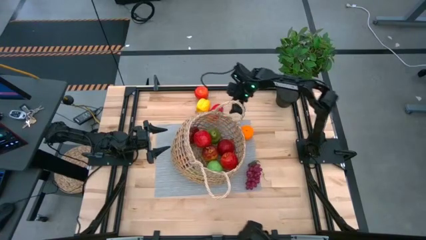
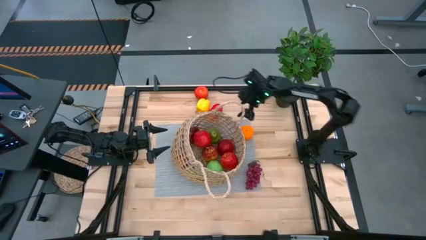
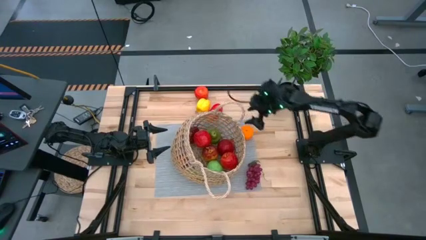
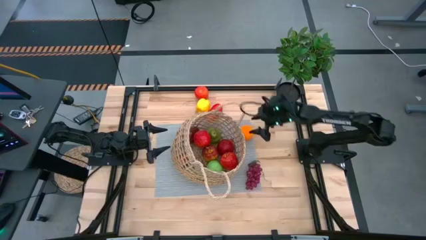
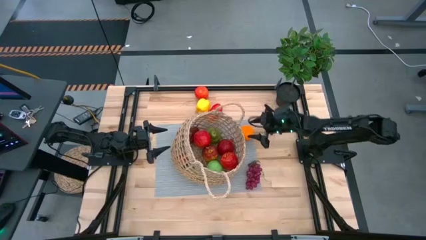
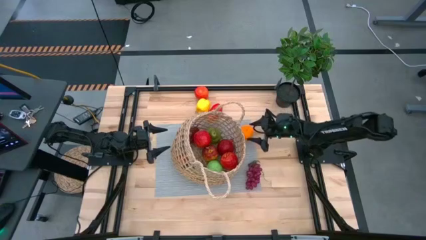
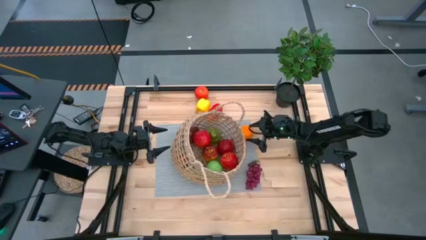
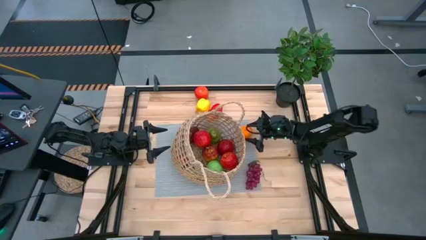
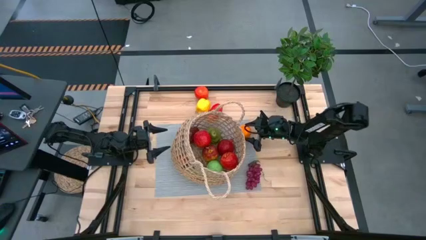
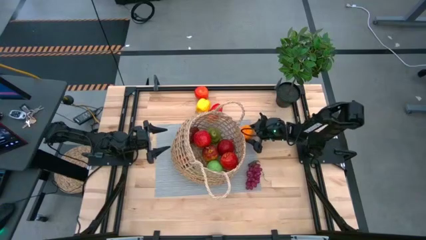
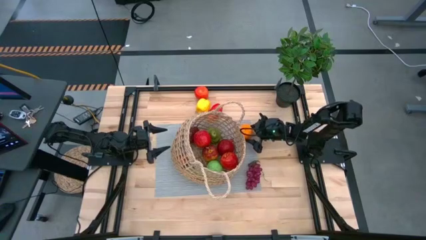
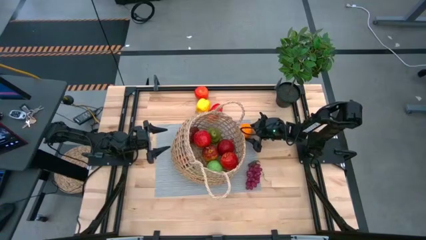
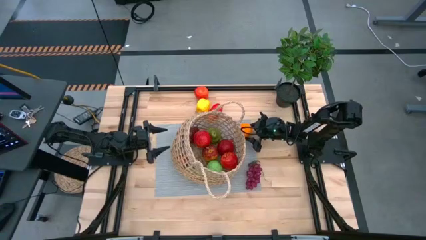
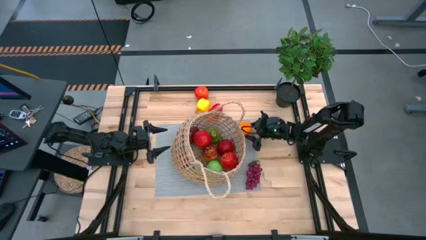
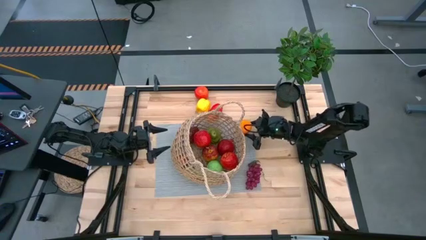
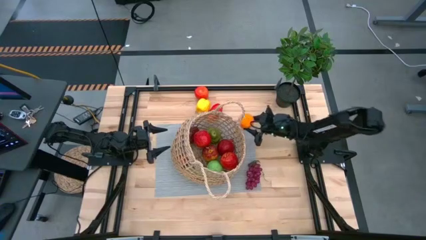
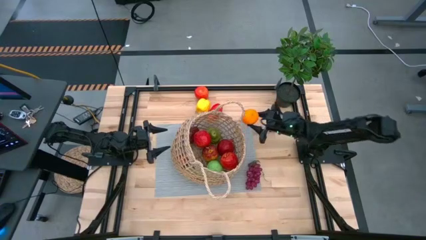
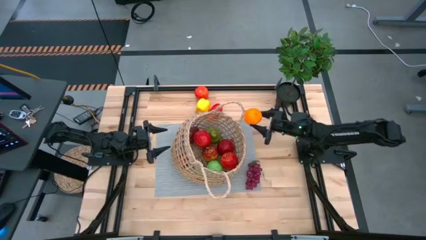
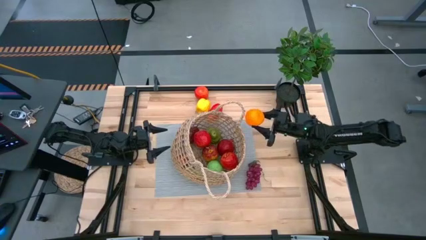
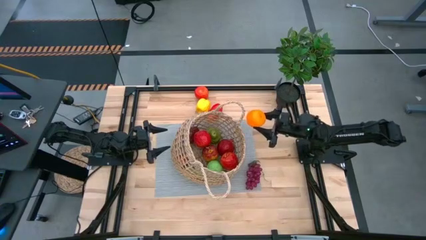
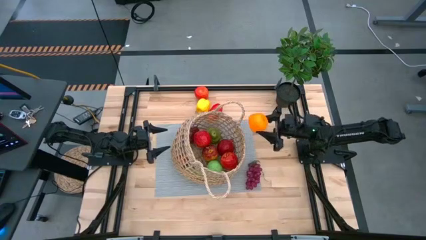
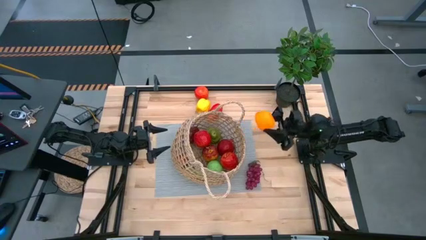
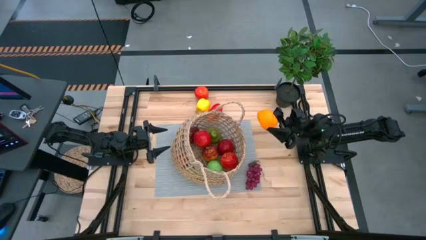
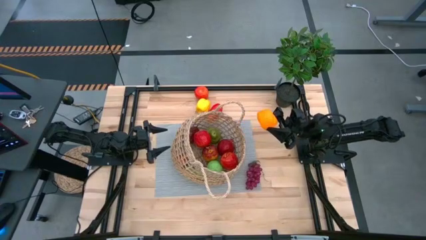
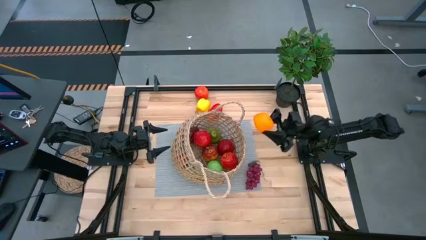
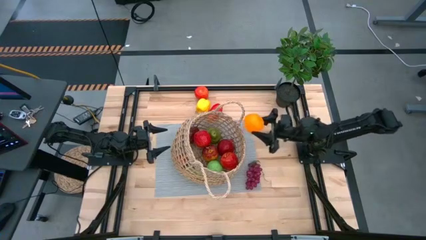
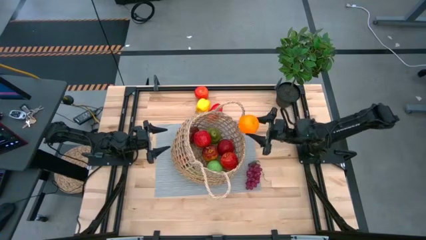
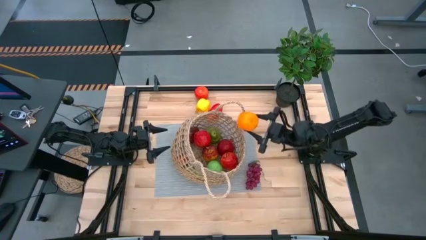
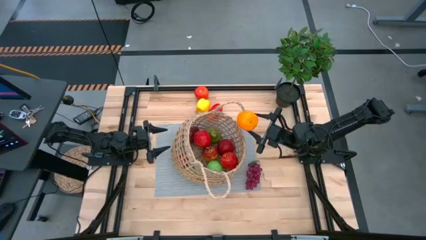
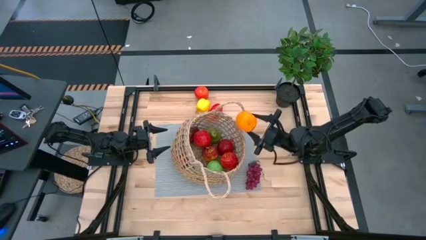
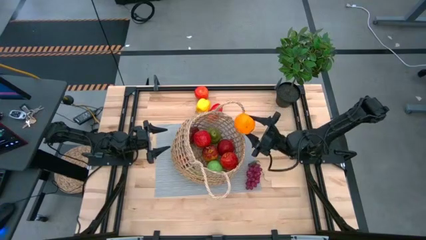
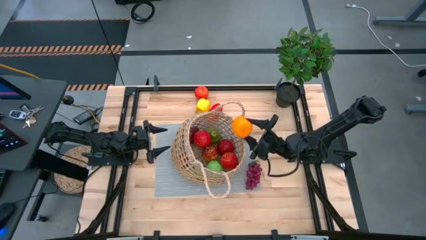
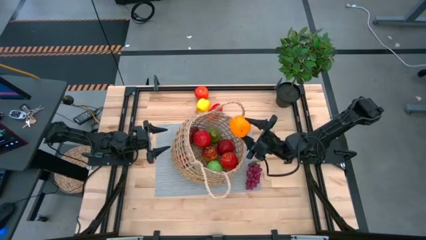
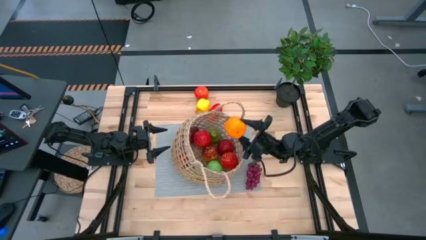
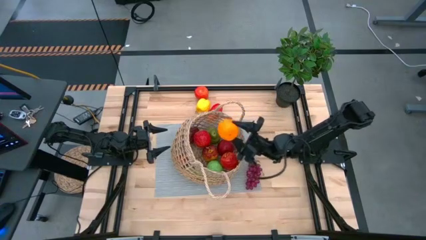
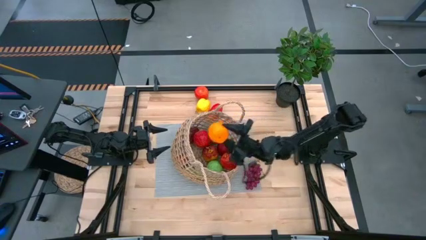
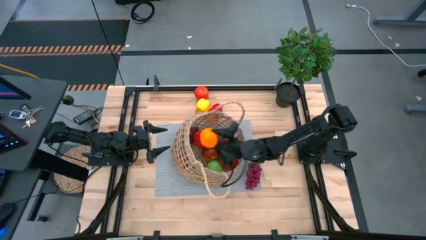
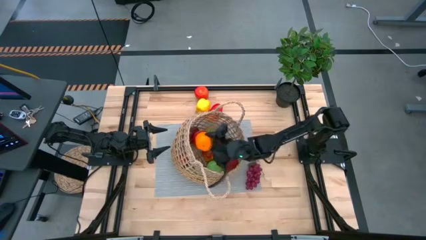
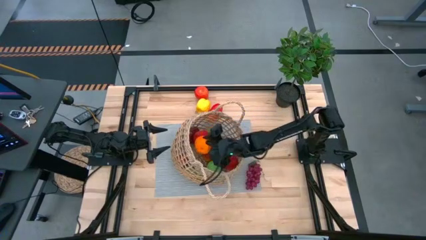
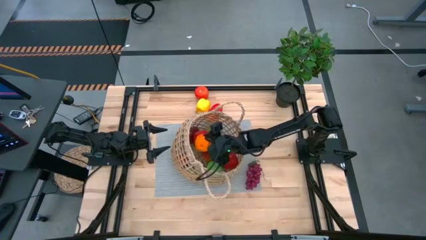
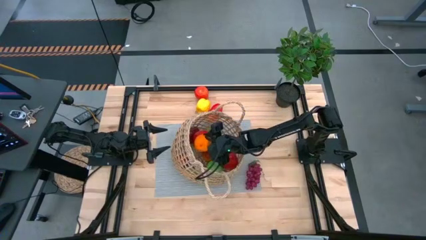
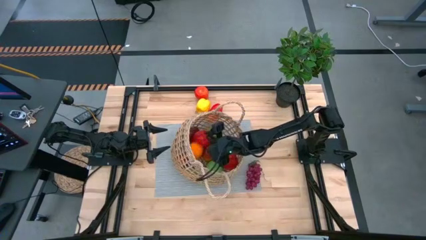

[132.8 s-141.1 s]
Task: Build produce basket
Put the orange into the mesh basket

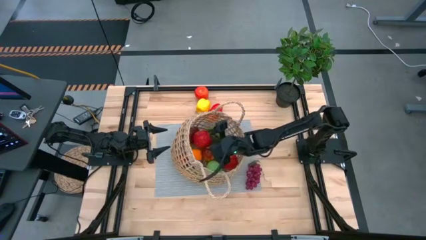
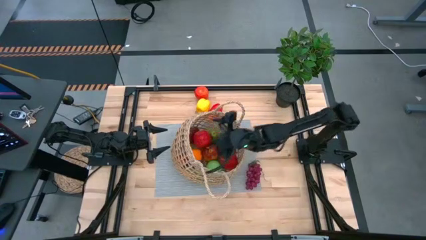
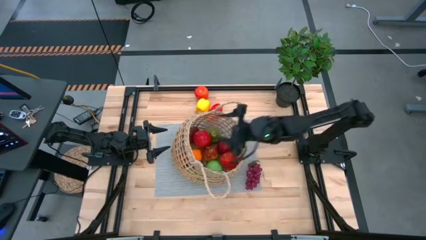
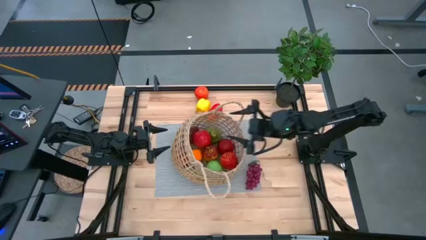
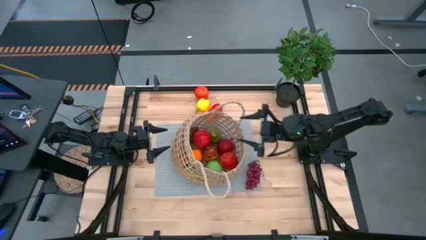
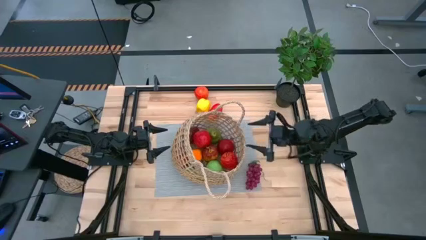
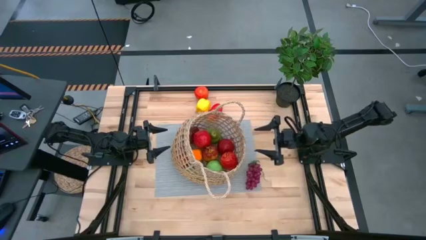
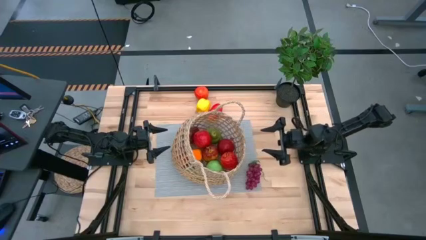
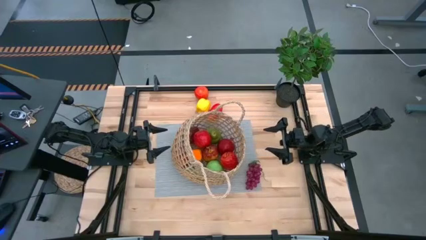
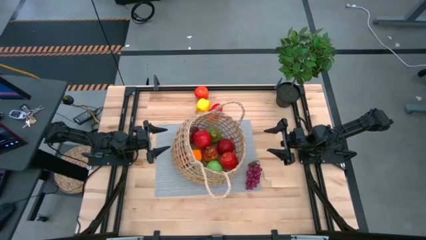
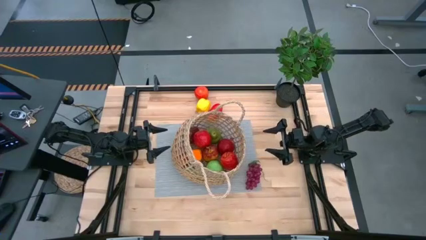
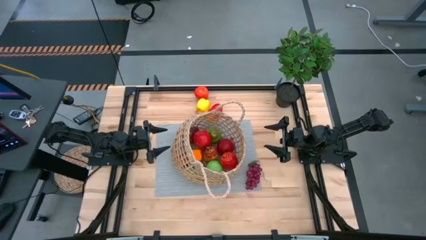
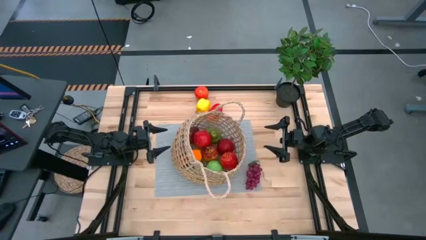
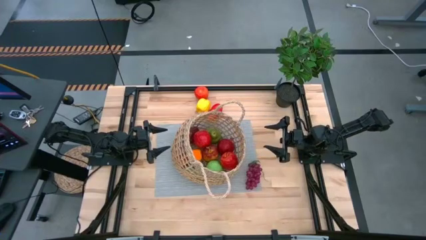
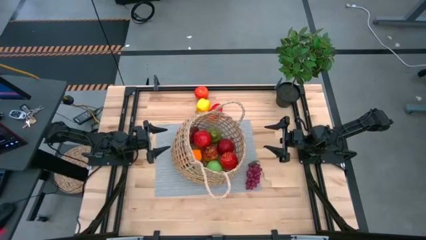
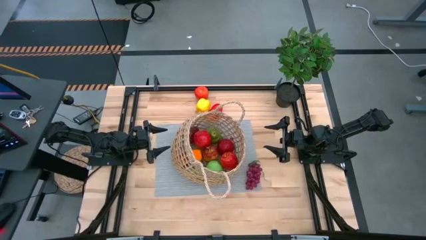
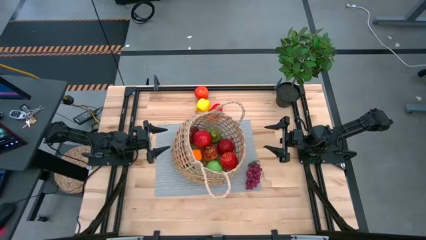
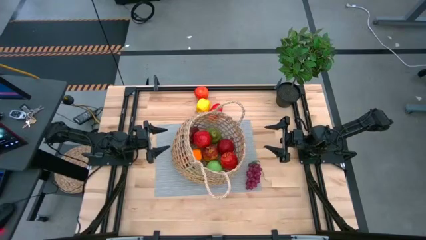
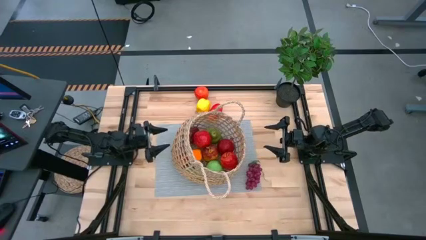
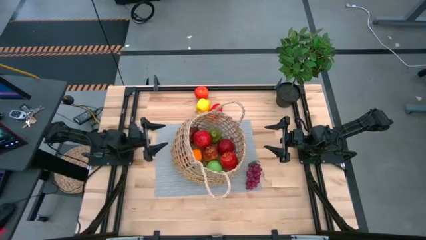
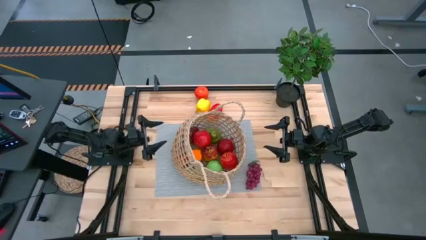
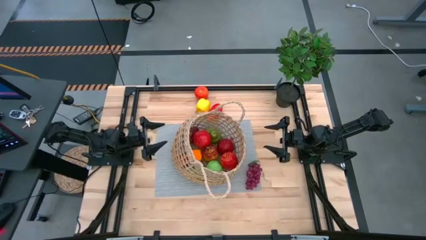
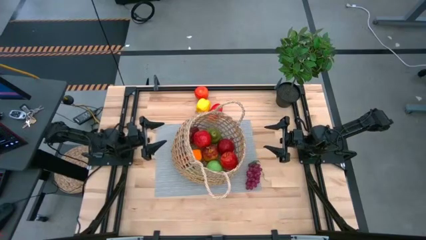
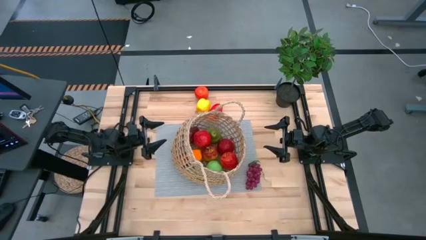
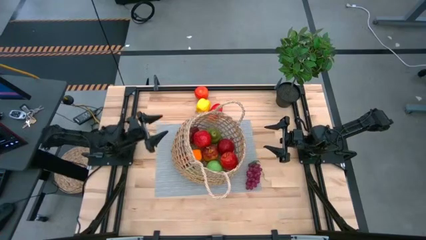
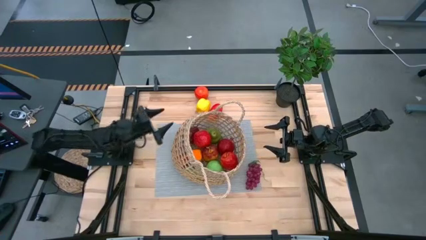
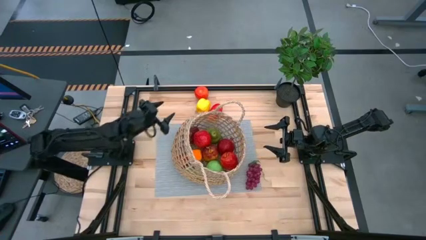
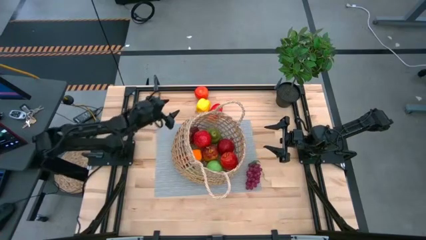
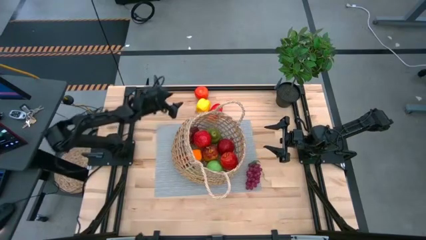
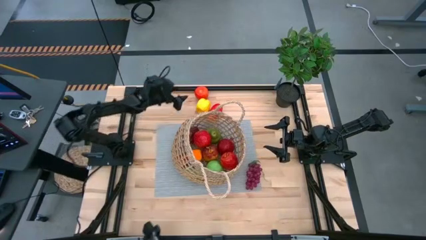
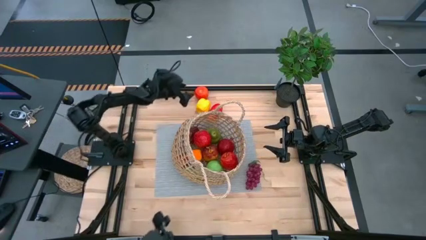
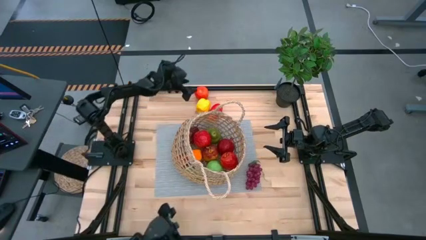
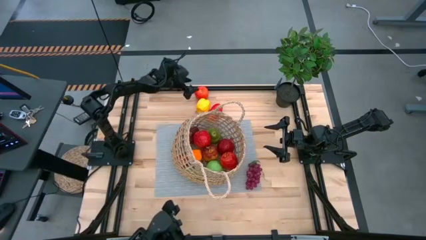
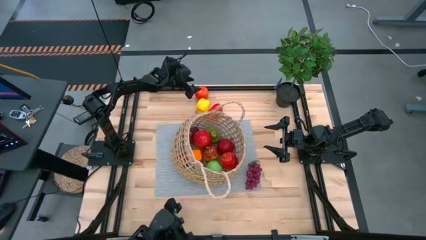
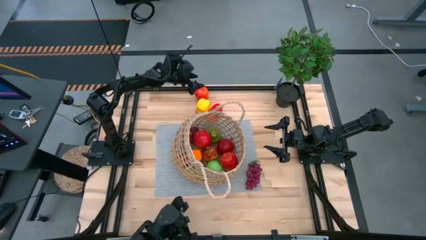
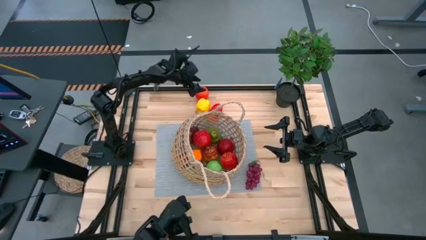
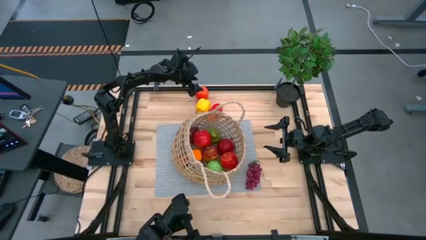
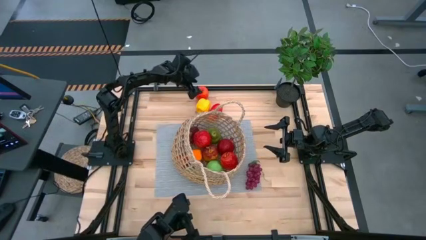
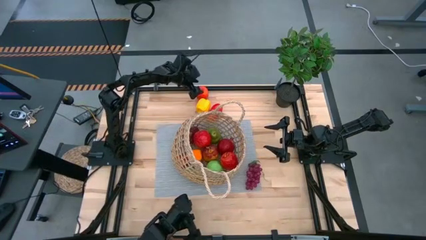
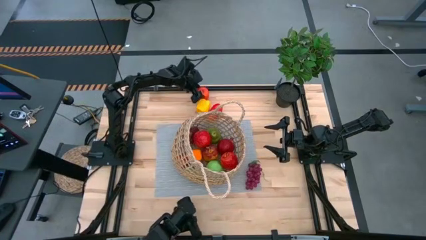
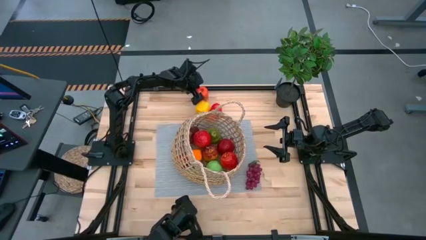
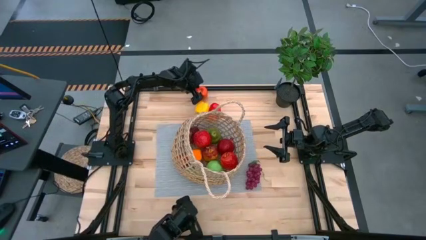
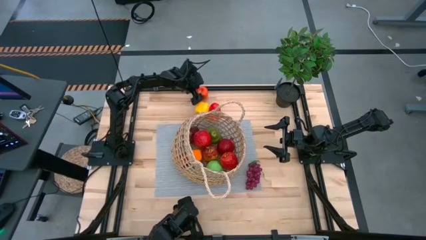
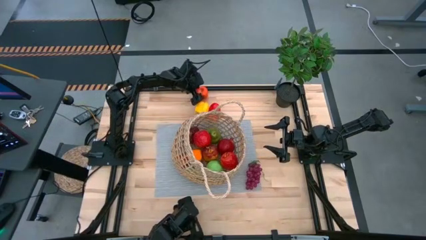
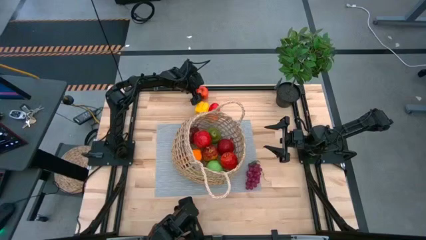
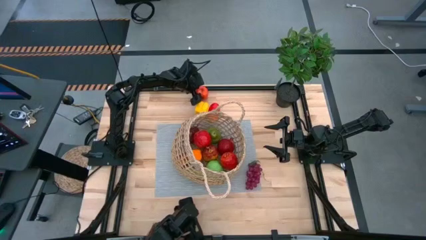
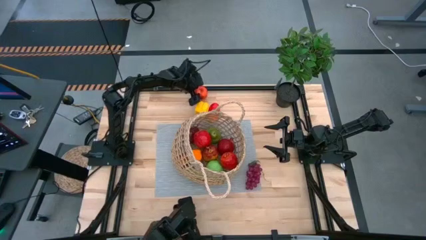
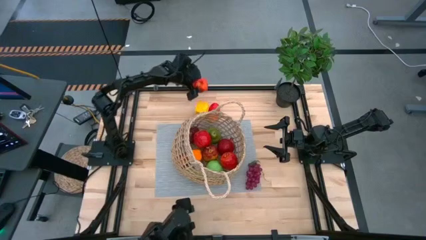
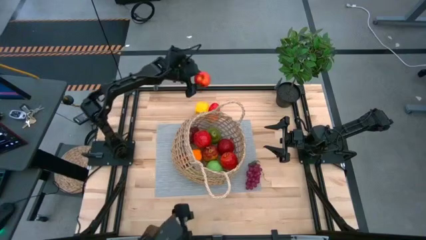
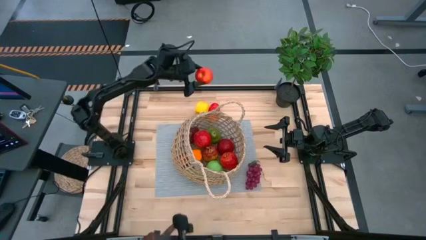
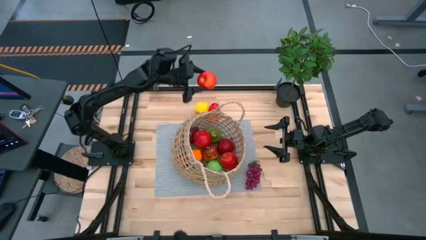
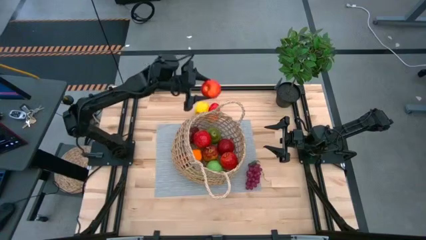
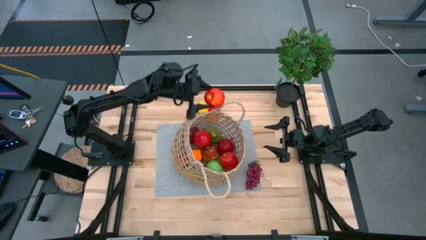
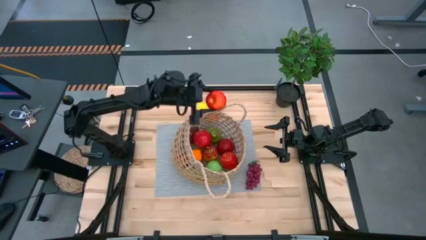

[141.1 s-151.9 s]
Put the red apple into the mesh basket
